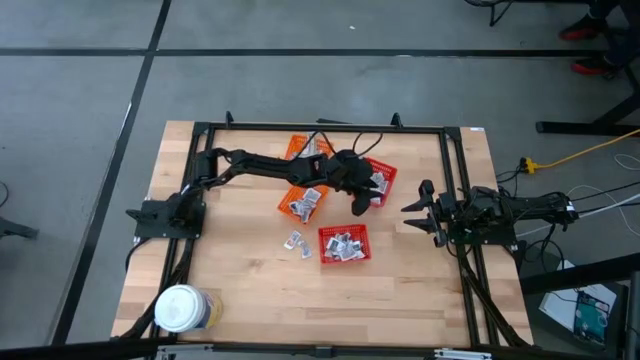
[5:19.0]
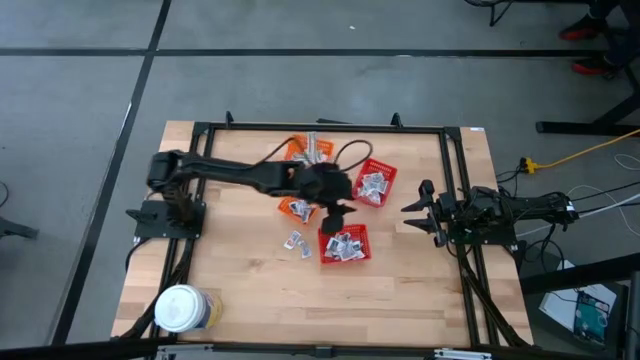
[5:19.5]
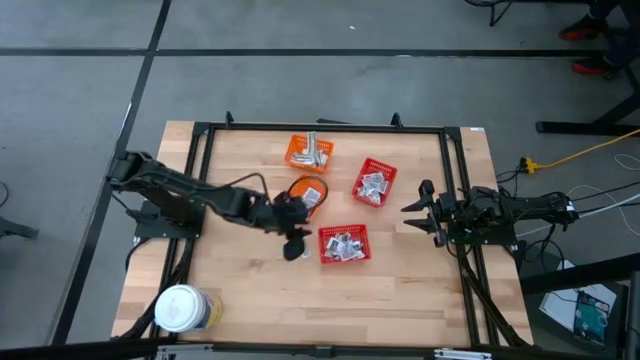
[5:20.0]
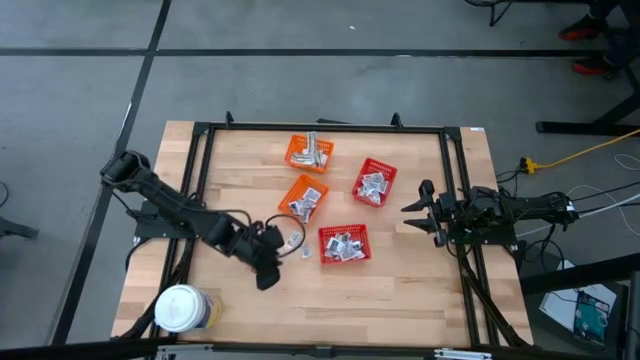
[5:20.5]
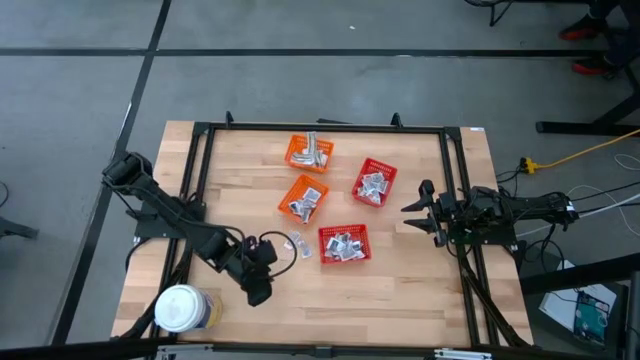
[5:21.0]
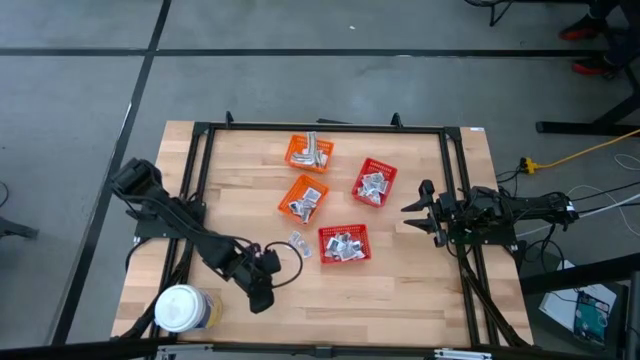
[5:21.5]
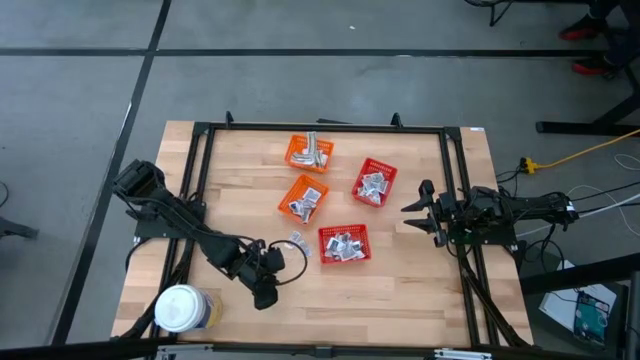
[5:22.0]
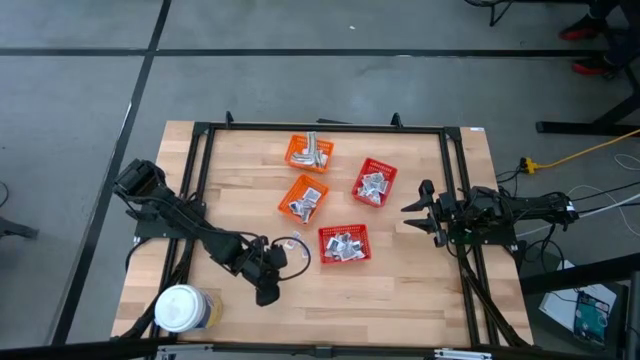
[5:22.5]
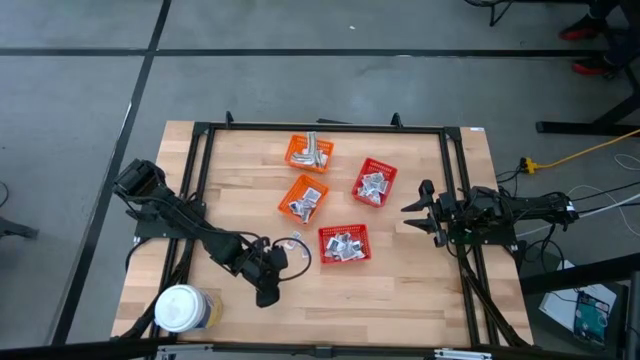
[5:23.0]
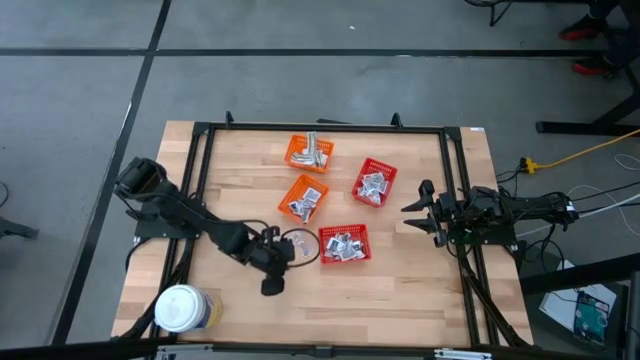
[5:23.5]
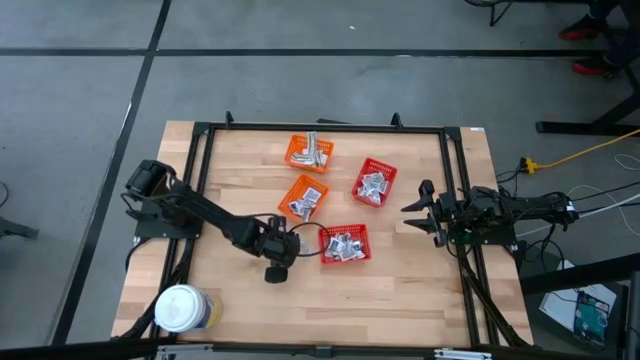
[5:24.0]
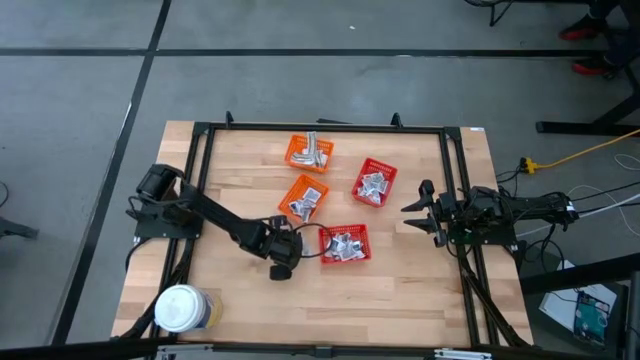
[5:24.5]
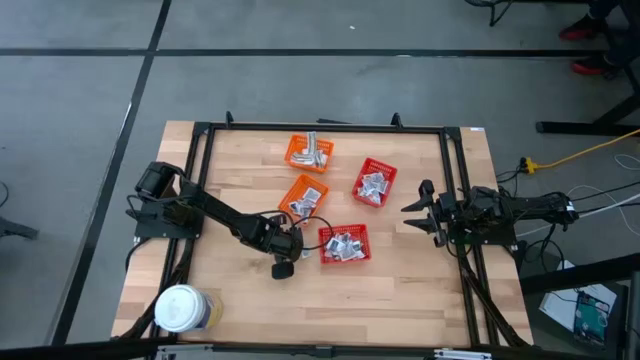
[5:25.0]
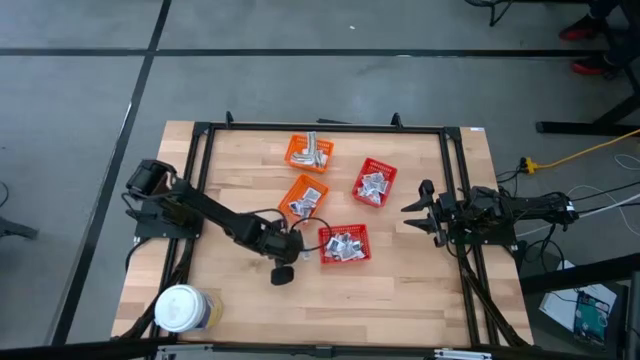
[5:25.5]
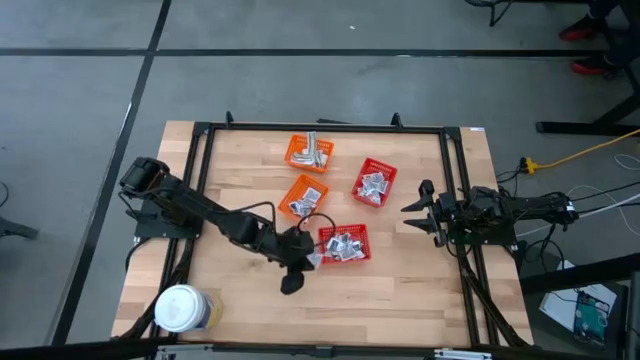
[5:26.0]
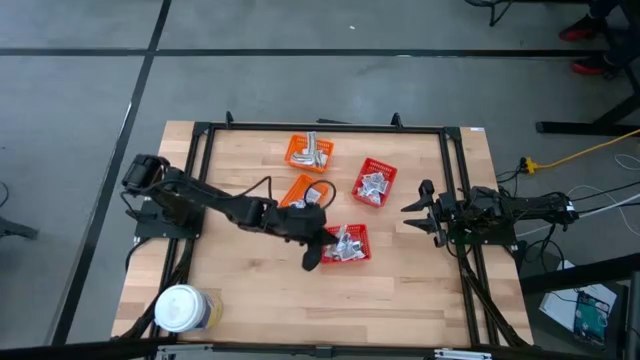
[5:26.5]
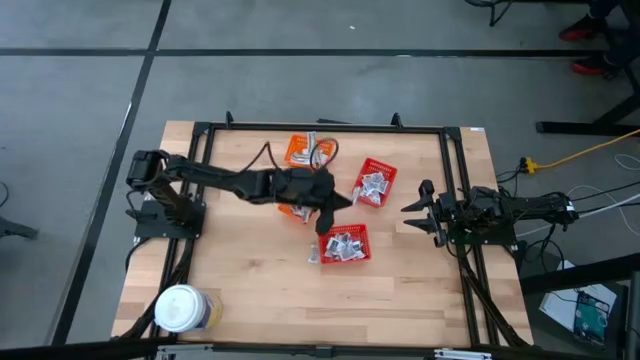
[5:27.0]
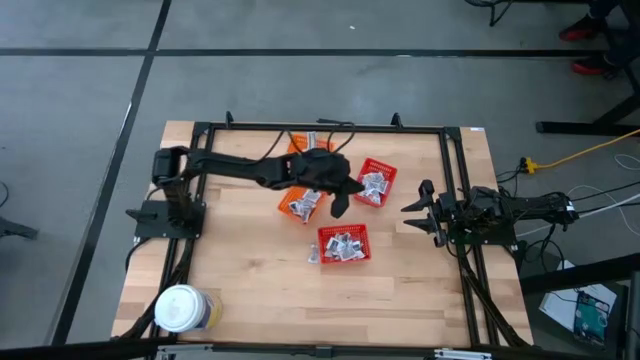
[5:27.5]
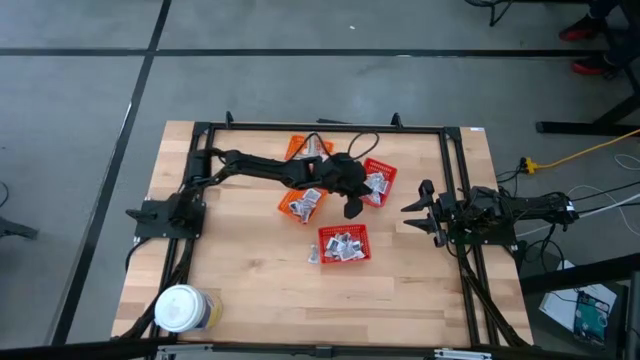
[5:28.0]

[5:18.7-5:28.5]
Task: Pick & Place First Aid Supplies
Put the orange ointment pack into the top red bin

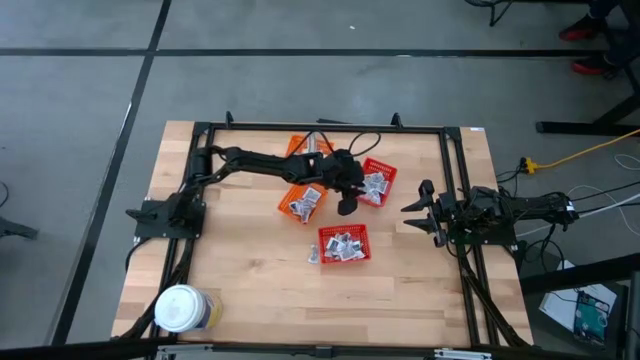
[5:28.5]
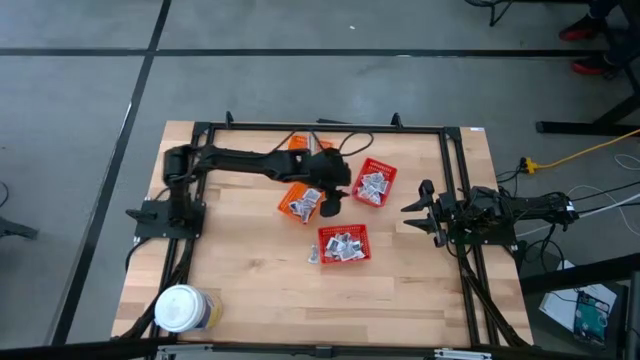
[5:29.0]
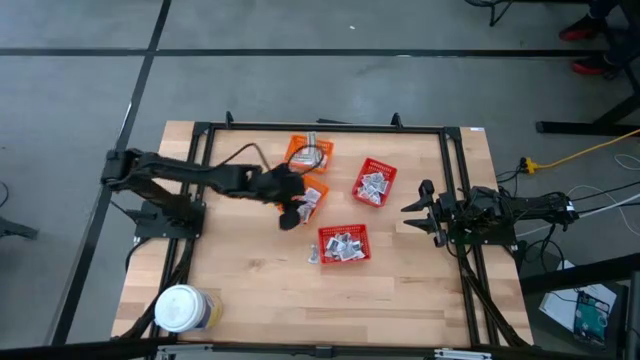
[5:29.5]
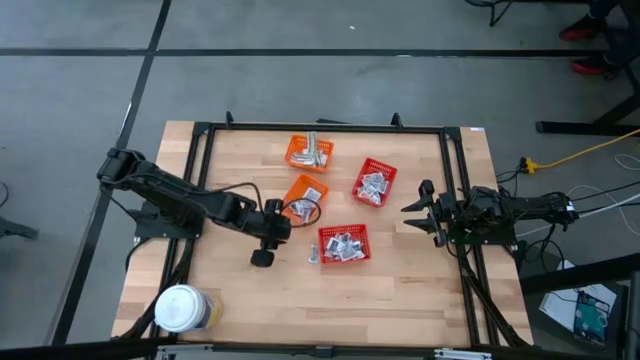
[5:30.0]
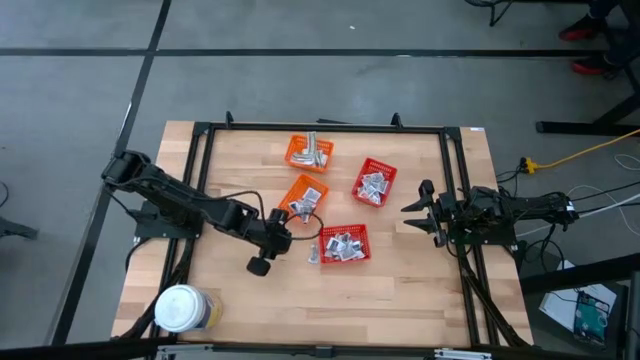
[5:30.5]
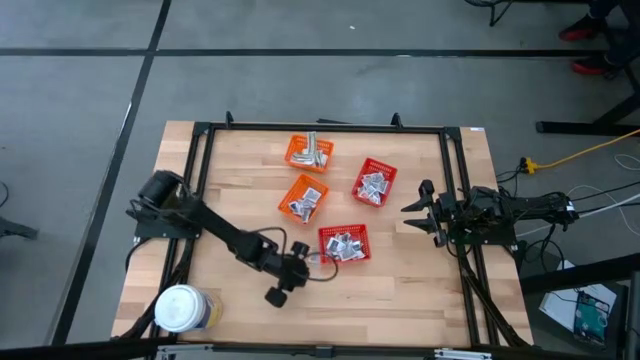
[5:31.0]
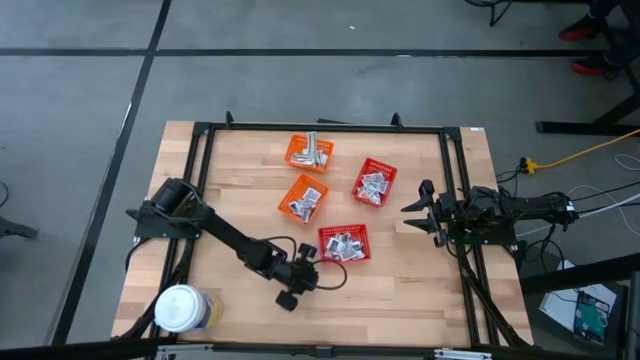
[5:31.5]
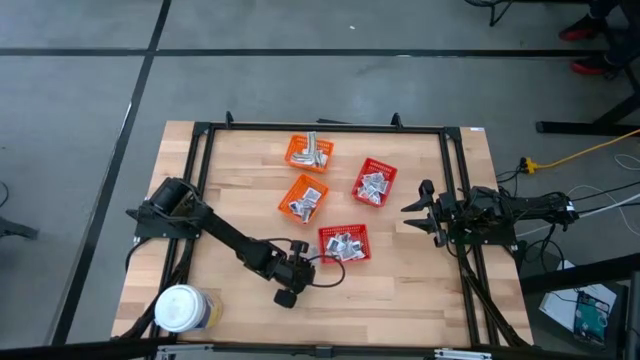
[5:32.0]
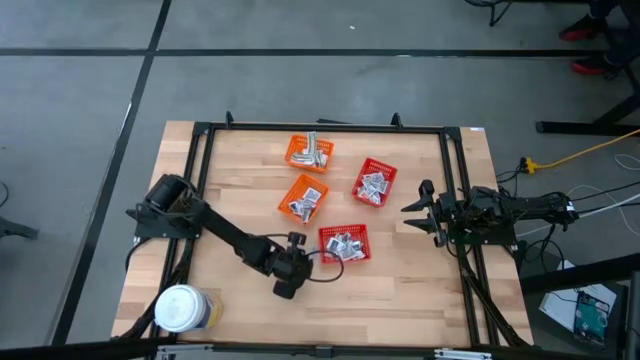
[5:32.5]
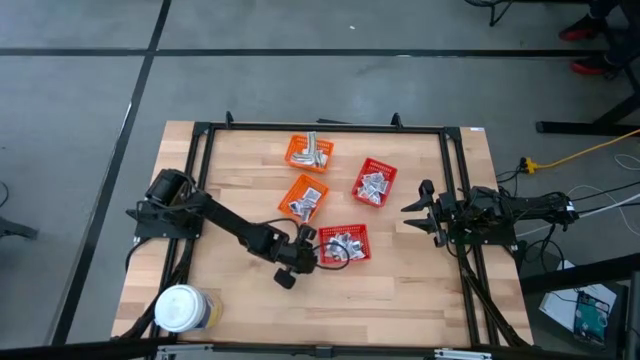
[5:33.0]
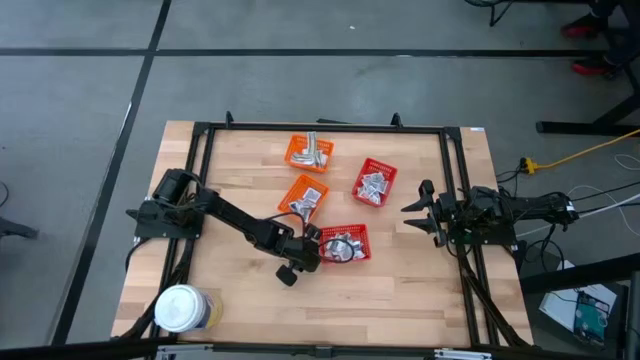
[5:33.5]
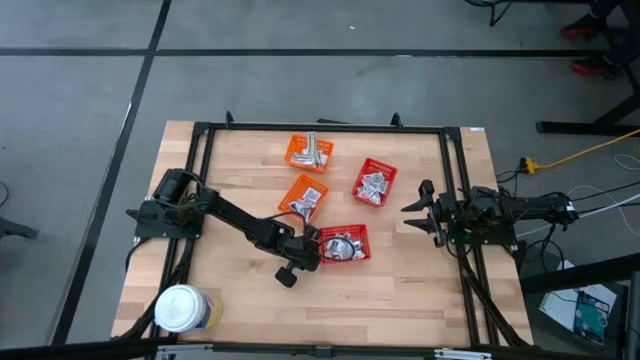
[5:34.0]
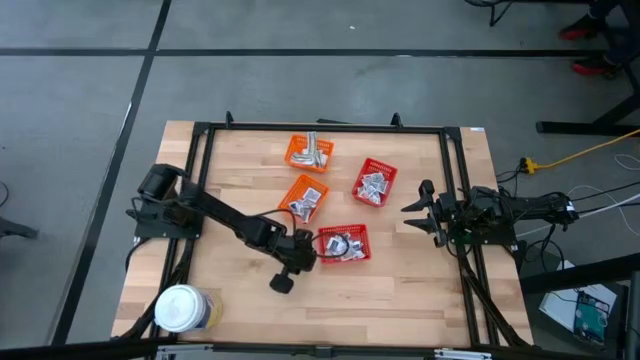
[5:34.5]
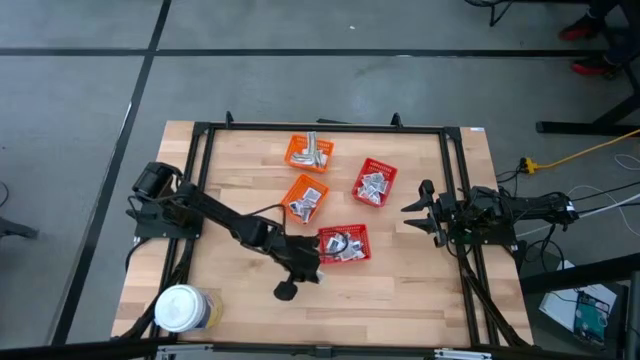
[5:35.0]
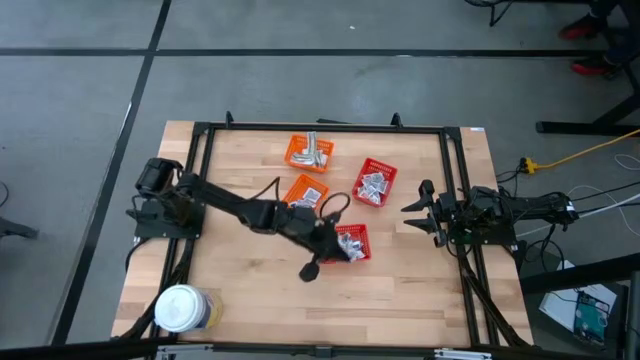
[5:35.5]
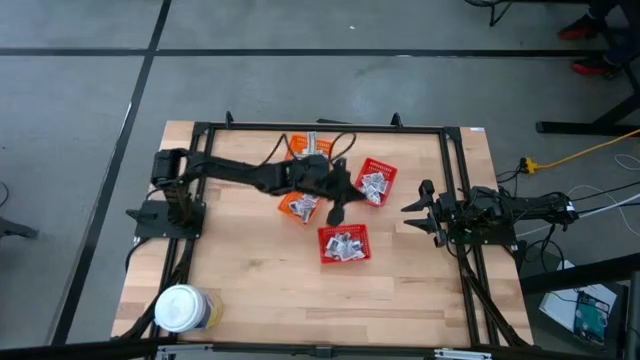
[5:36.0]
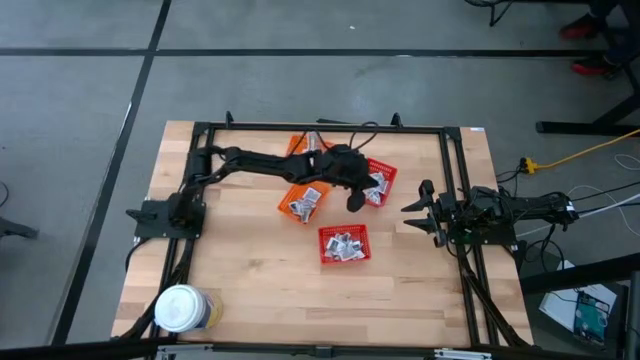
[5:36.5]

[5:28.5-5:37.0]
Put the orange ointment pack into the top red bin

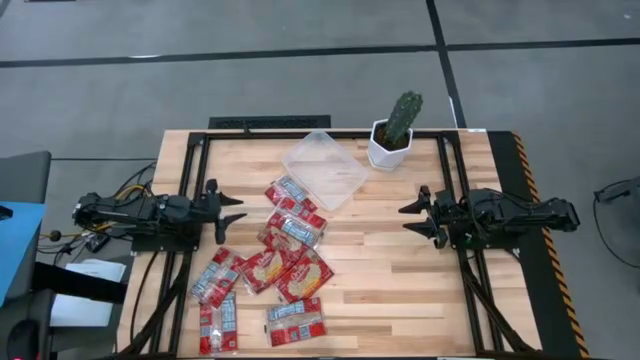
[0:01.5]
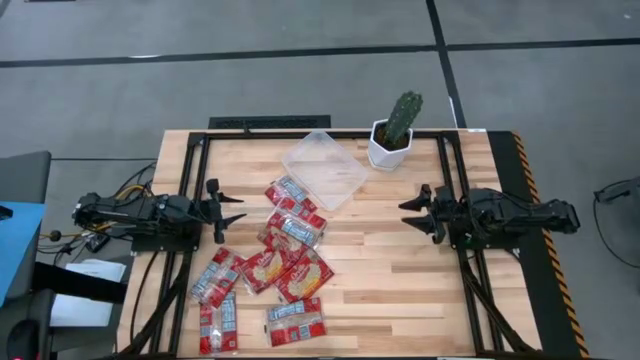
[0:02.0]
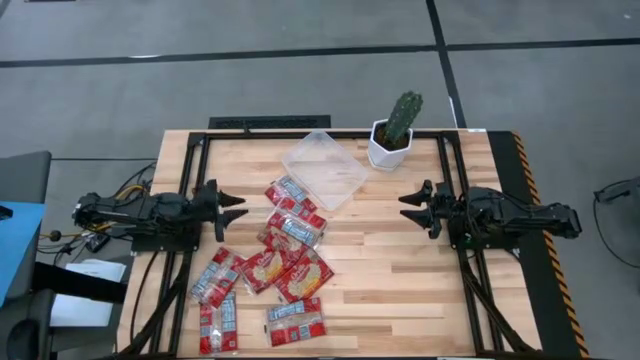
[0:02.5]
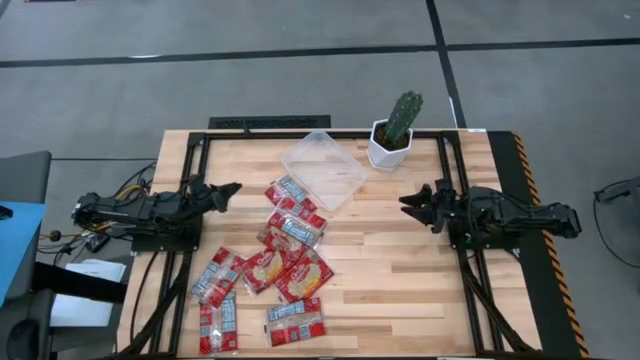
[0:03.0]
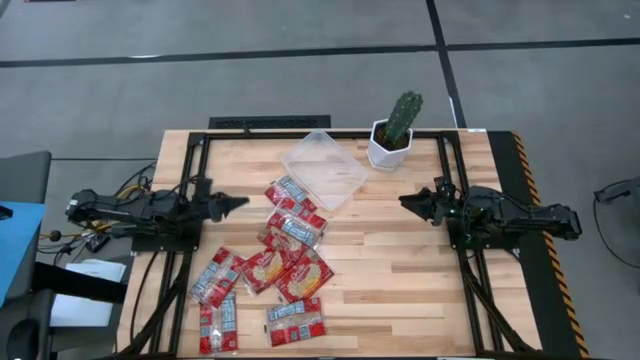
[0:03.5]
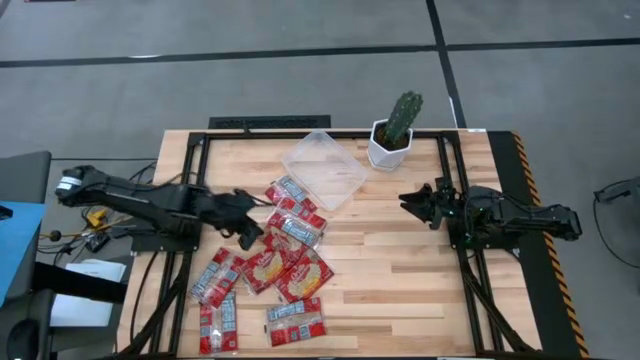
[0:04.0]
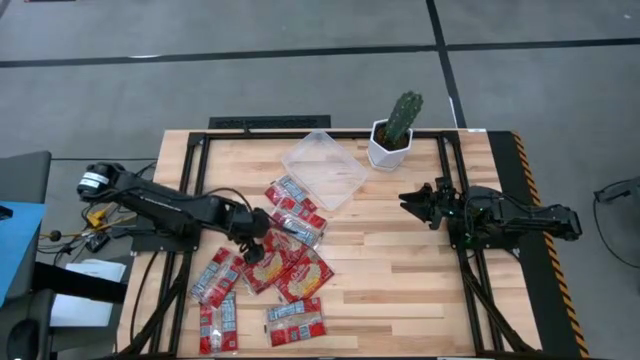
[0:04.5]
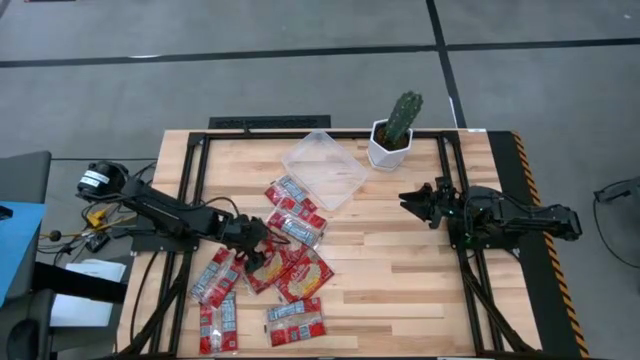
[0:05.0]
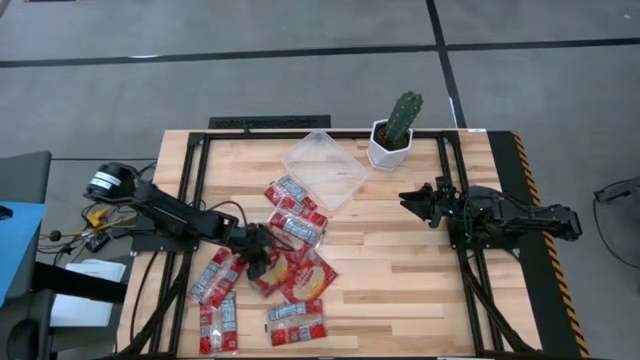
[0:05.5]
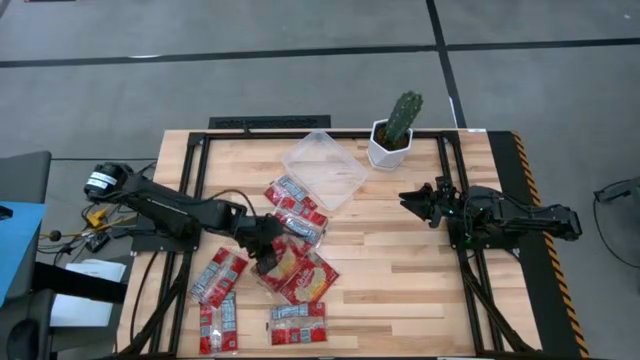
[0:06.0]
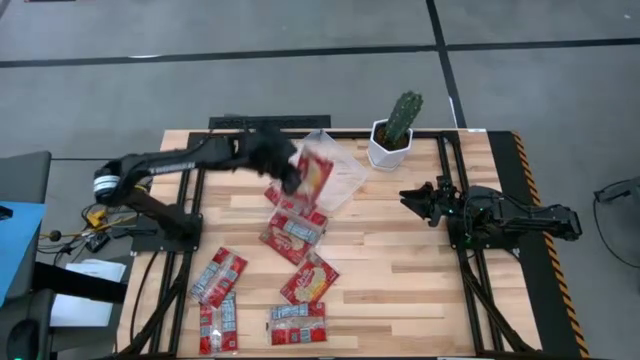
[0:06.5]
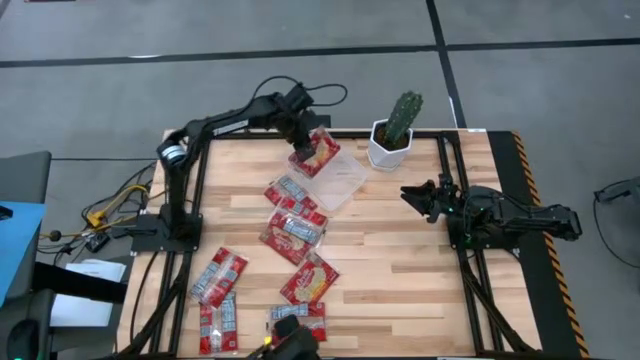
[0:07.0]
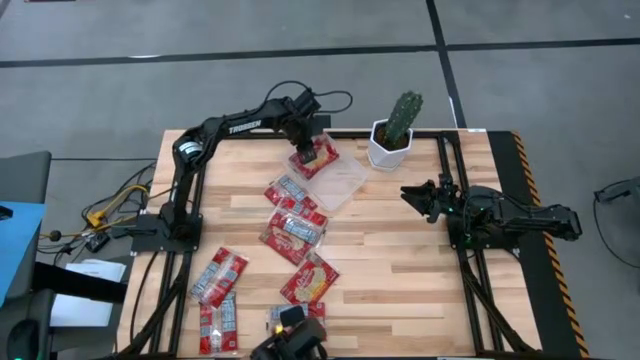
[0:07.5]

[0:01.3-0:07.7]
Task: Sort popcorn bags into baskets
Put the red popcorn bag into the transparent bin
